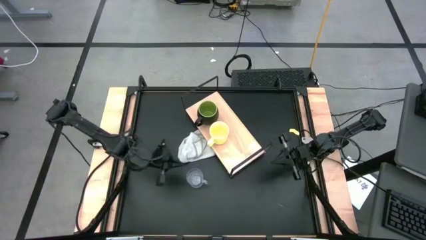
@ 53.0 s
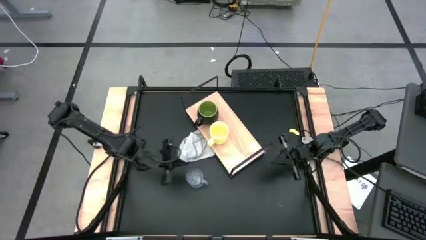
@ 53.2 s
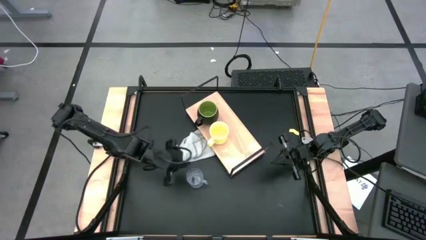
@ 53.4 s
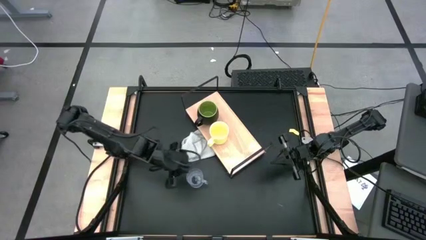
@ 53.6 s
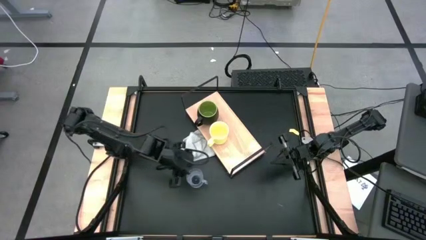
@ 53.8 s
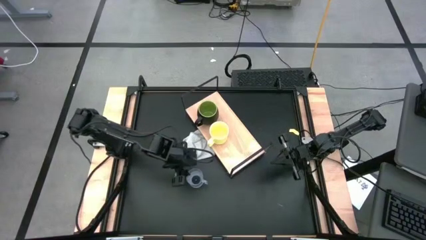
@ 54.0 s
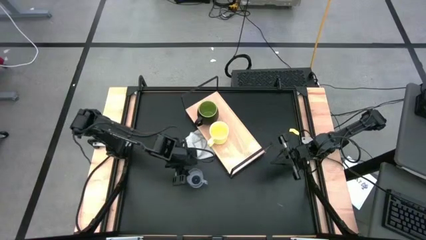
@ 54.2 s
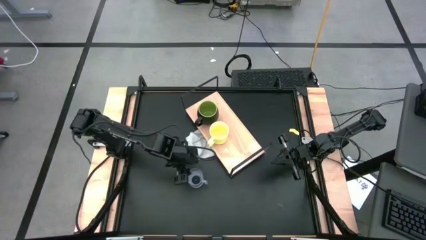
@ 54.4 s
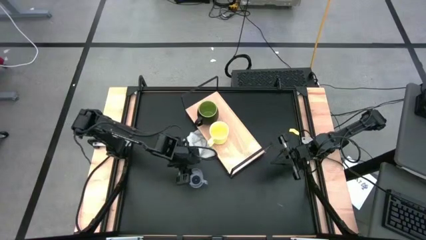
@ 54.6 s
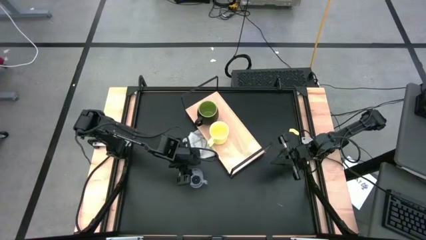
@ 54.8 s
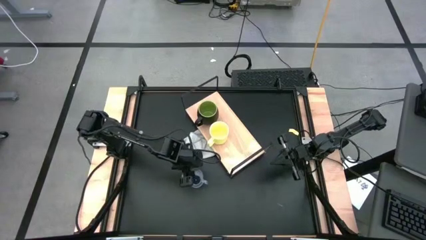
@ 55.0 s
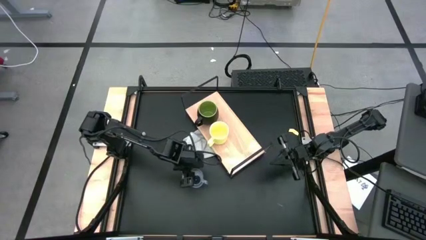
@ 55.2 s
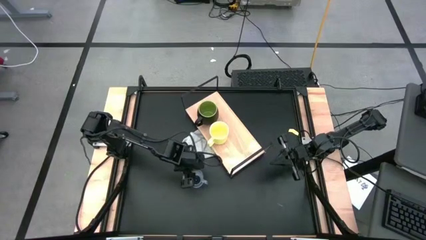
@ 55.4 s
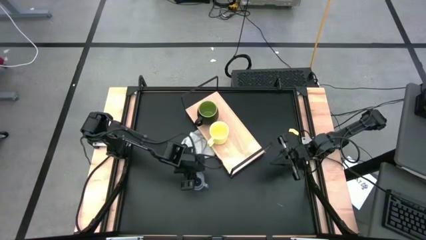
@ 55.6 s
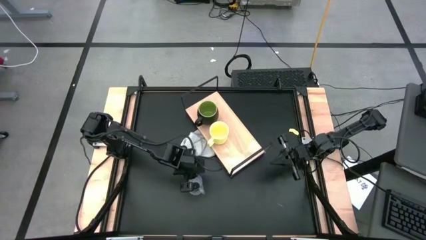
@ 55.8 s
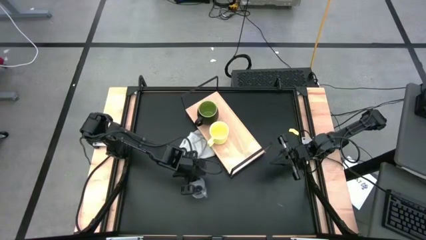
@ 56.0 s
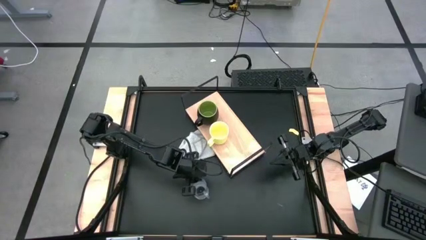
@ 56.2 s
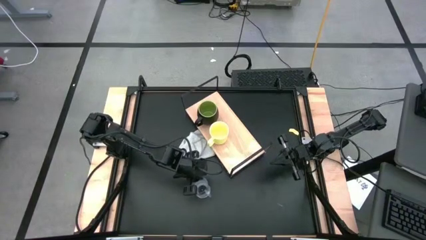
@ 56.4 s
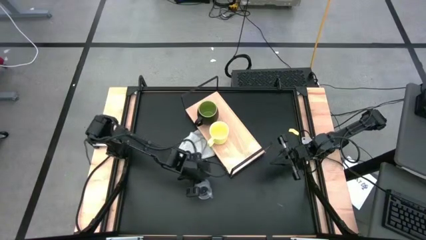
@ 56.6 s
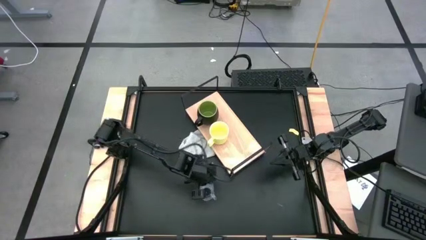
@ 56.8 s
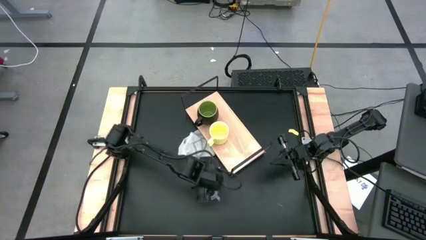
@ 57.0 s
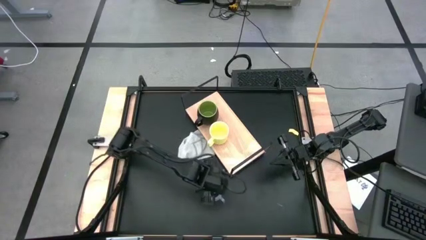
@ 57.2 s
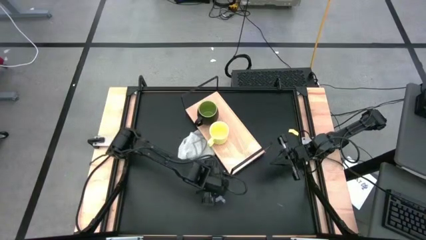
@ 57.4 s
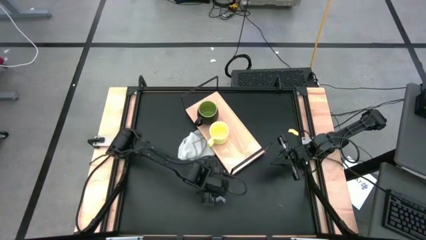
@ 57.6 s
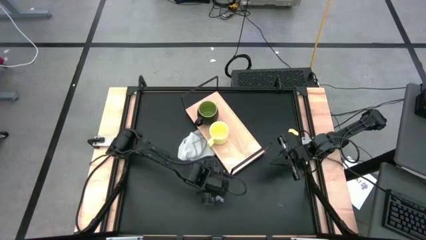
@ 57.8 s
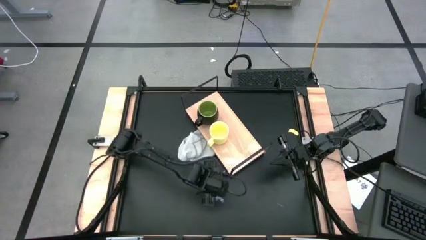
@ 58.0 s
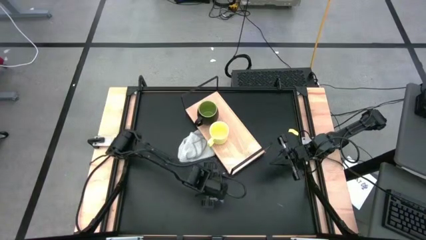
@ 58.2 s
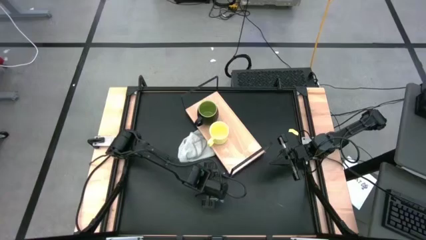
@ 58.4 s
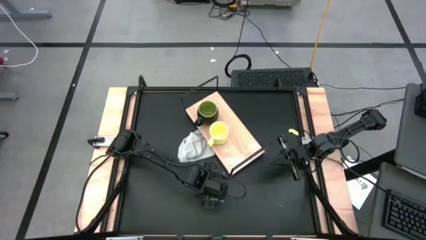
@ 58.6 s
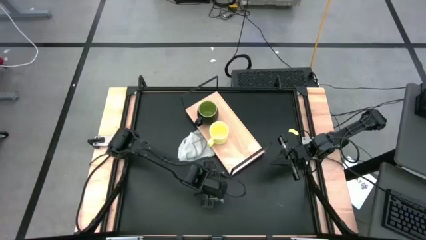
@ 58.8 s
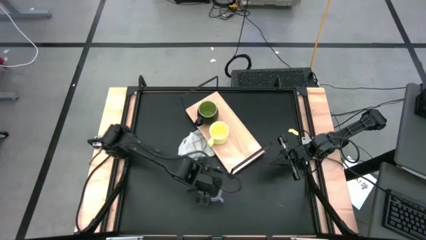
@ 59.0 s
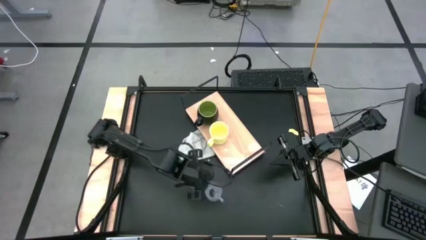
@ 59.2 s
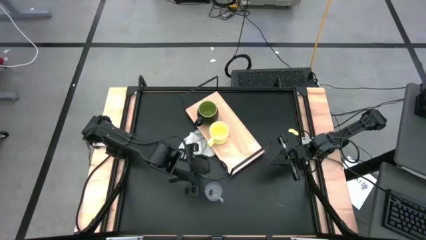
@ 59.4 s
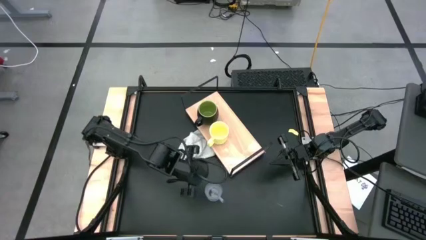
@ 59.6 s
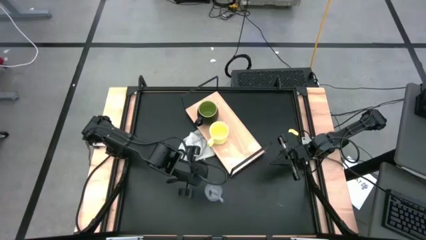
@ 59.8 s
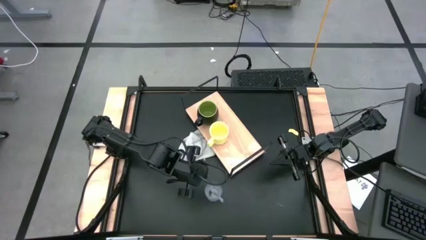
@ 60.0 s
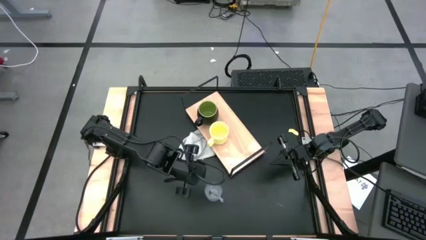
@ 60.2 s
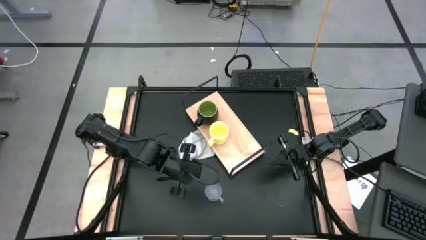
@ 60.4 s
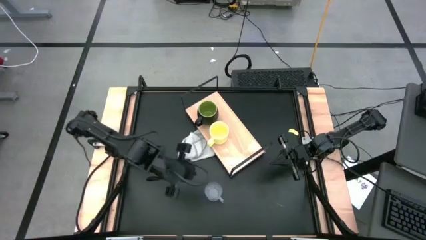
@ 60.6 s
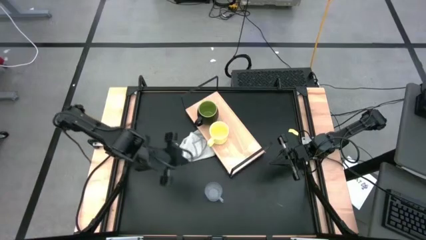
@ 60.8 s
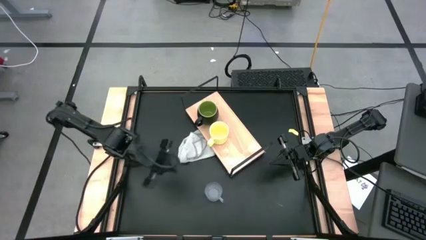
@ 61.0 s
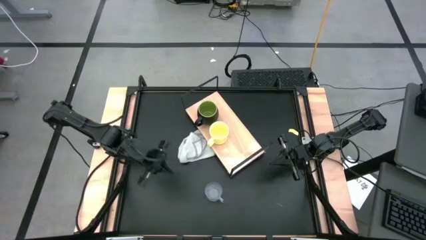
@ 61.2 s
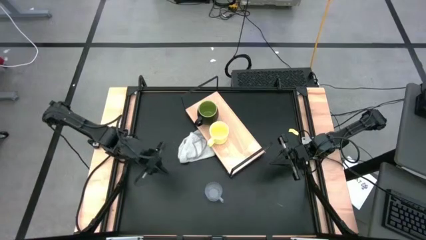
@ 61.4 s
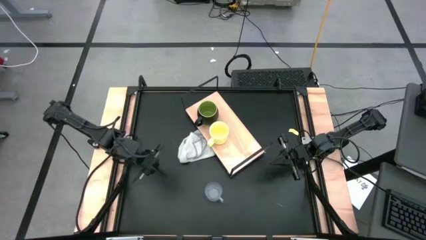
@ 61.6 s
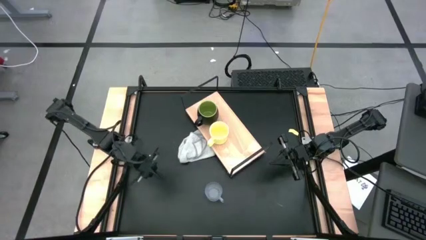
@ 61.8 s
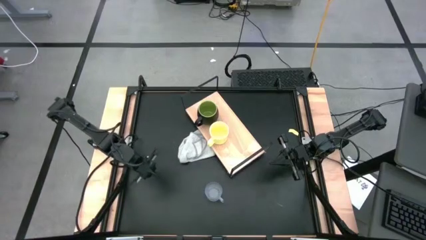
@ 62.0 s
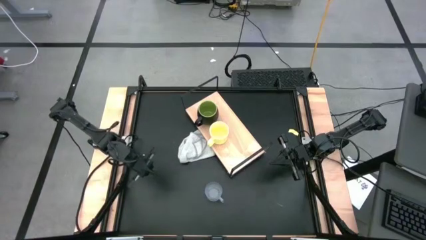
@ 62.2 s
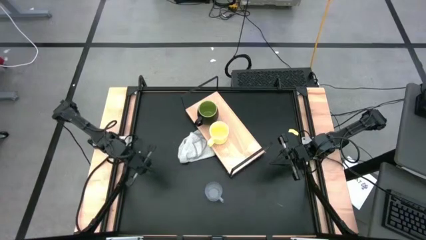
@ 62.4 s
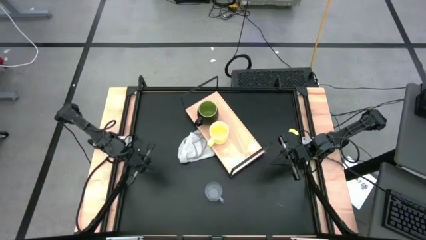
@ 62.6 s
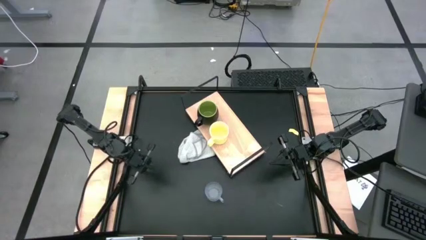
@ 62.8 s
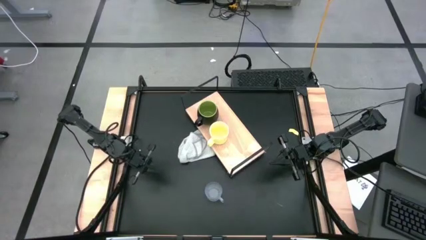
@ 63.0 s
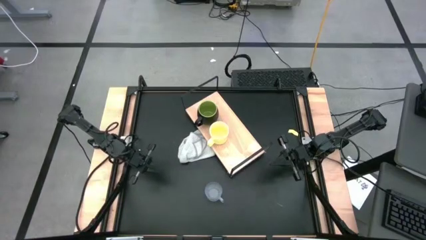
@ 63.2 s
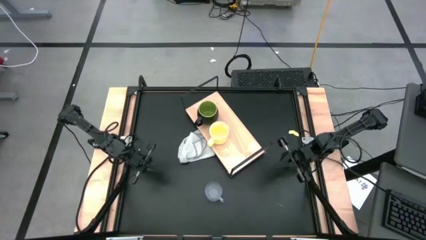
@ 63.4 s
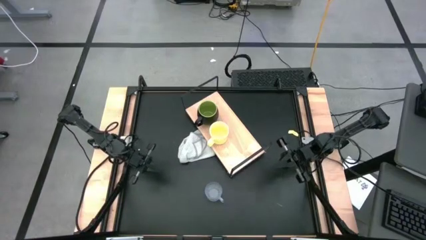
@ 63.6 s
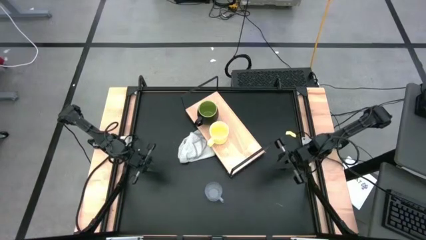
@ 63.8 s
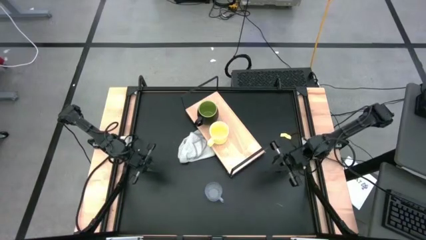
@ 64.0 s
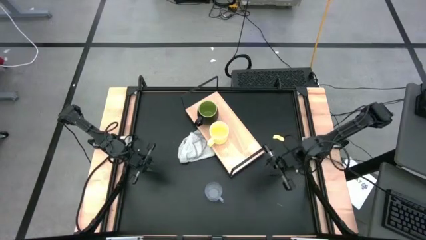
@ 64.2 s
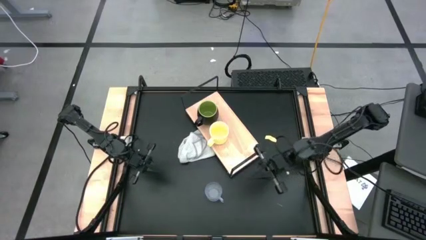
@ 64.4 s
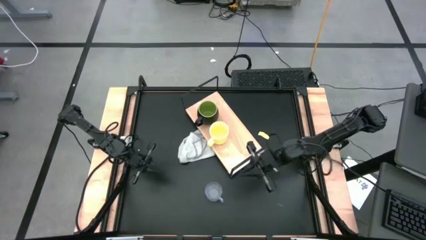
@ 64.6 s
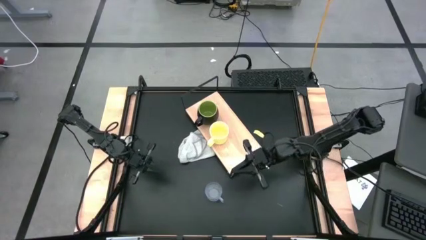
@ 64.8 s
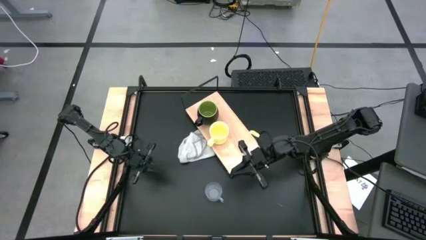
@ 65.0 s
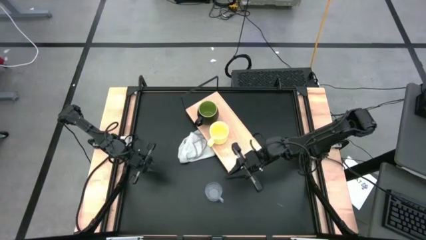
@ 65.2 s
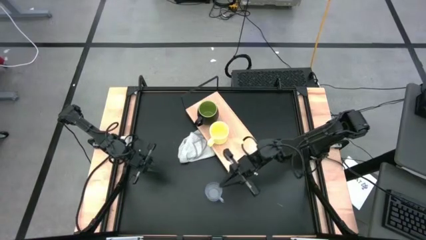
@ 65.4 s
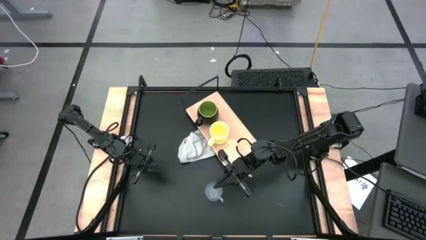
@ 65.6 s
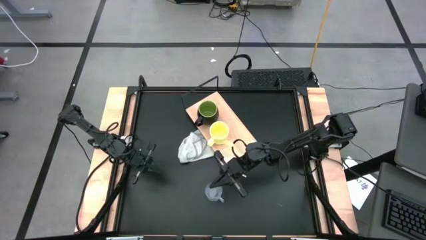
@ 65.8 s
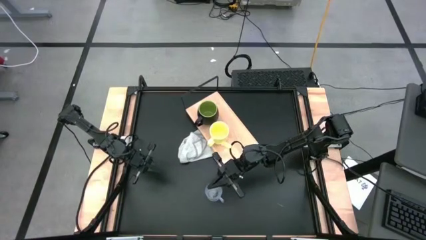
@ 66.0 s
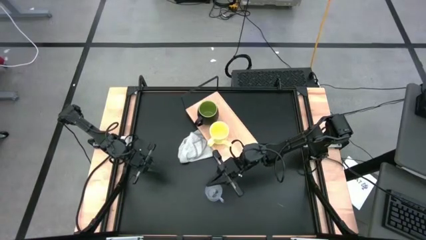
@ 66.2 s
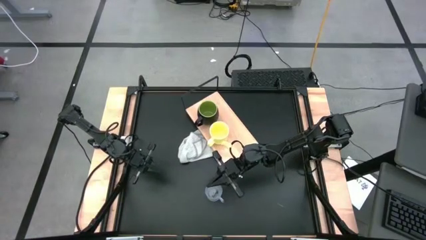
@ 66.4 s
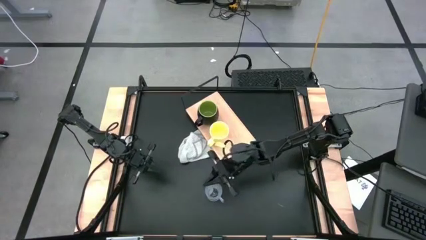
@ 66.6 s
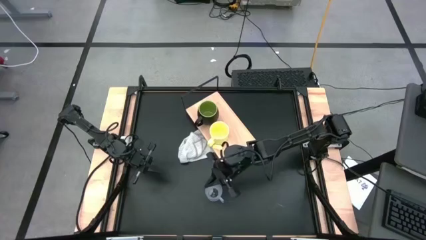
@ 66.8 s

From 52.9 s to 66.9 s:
Task: Stack small to large cups/mugs on shelf
Put the transparent mug on the shelf
